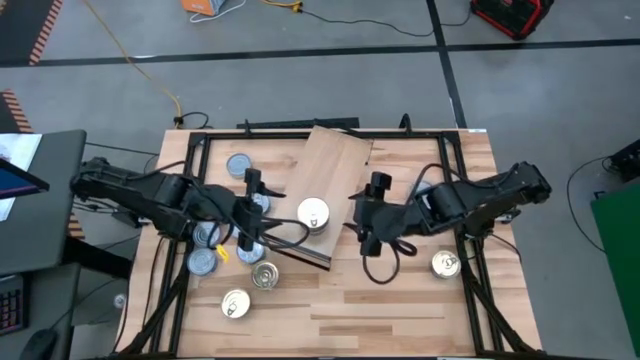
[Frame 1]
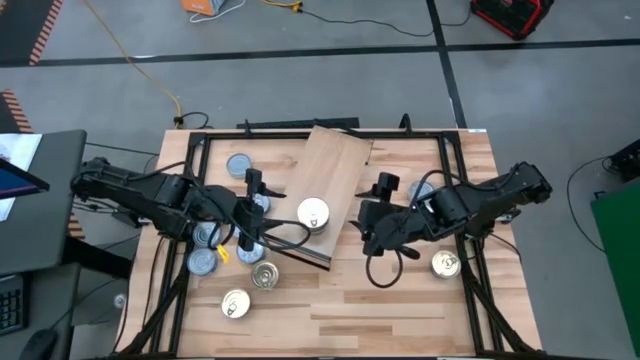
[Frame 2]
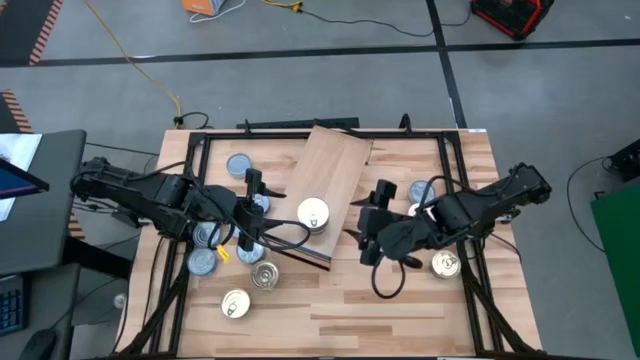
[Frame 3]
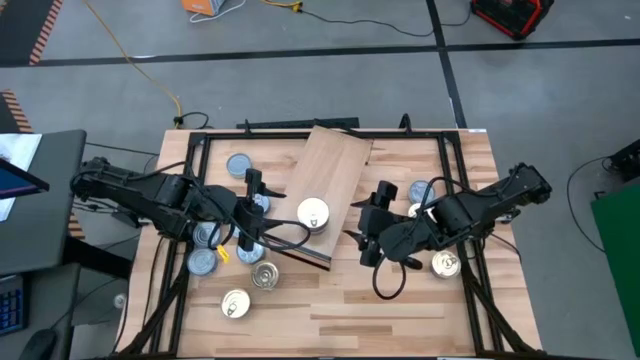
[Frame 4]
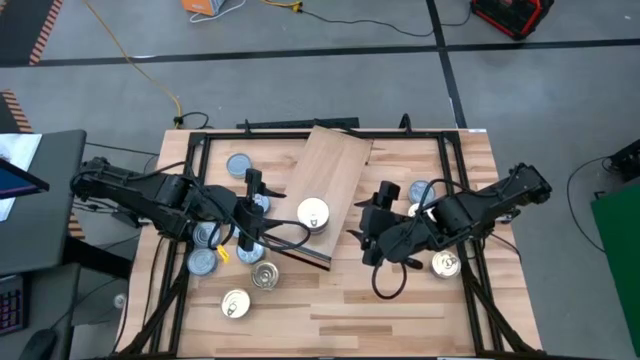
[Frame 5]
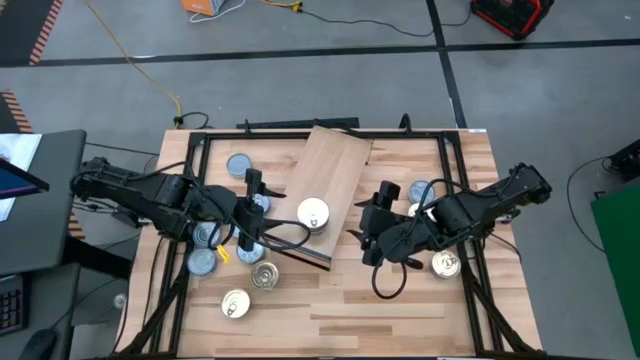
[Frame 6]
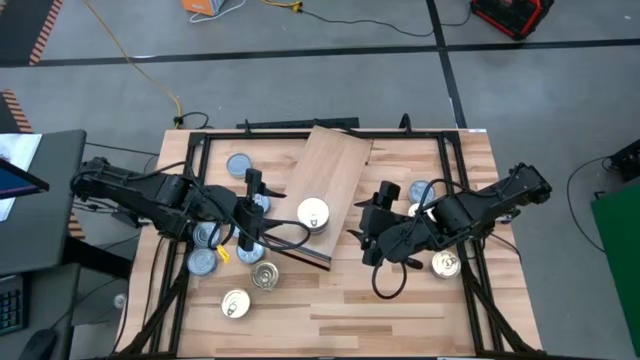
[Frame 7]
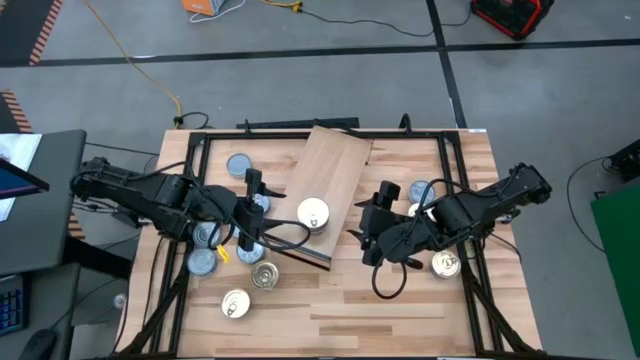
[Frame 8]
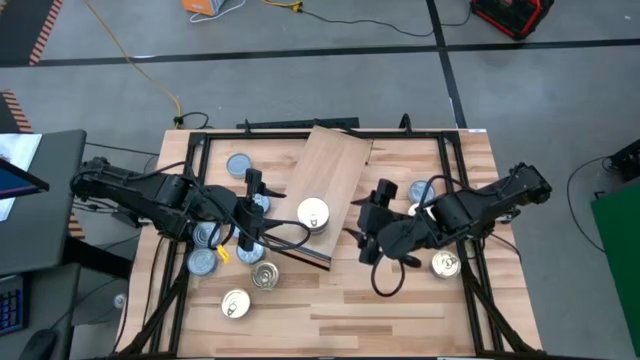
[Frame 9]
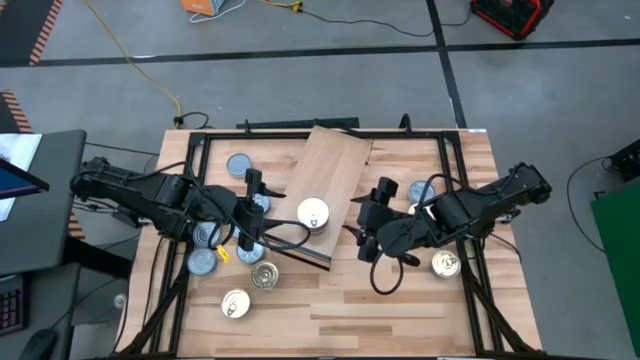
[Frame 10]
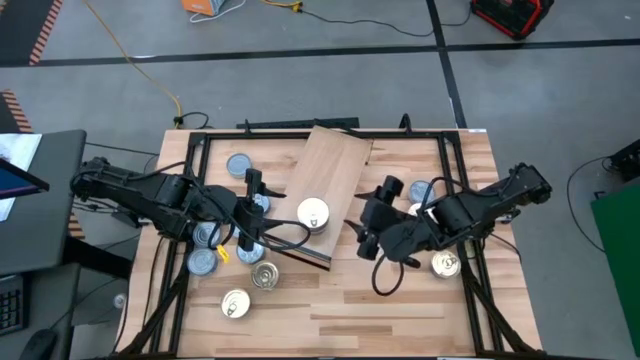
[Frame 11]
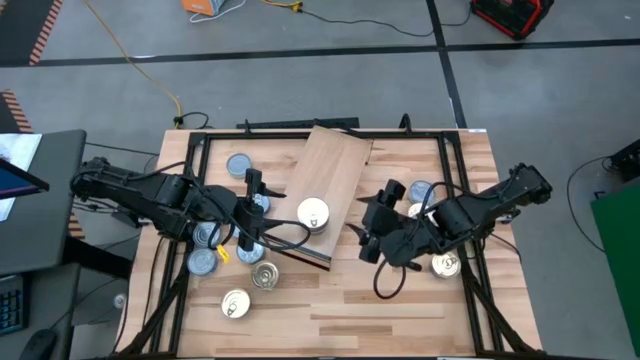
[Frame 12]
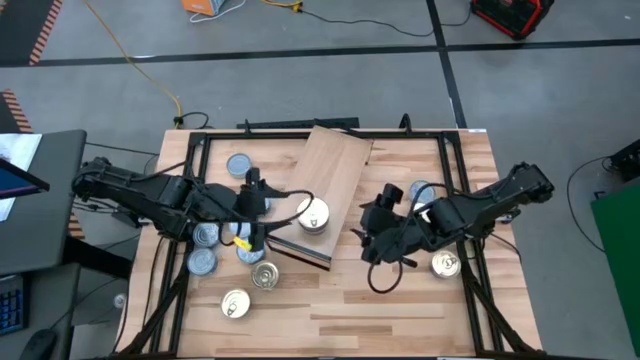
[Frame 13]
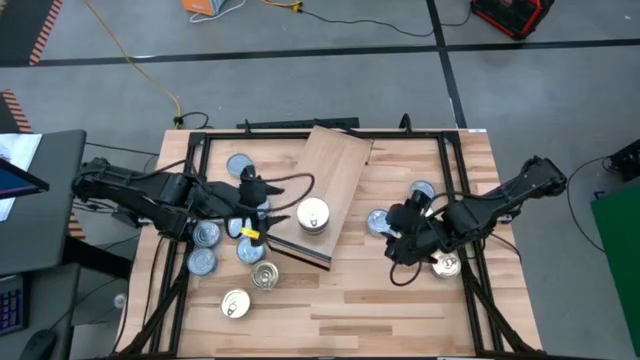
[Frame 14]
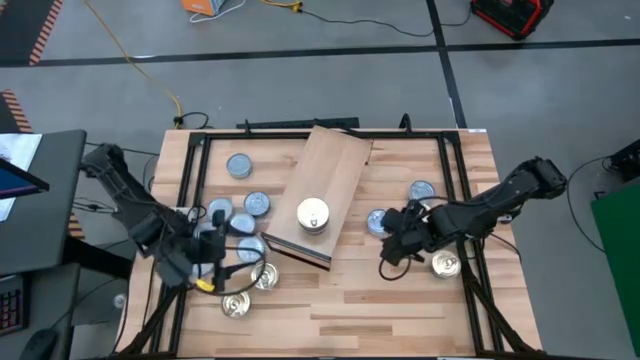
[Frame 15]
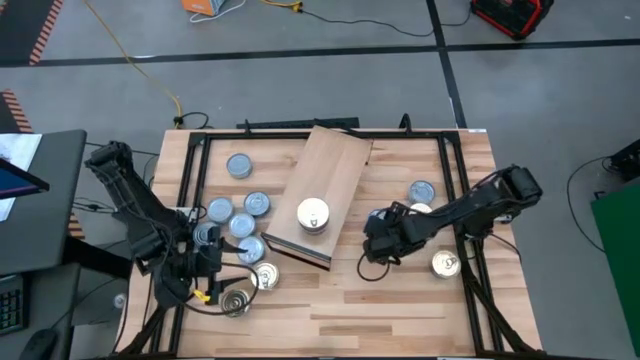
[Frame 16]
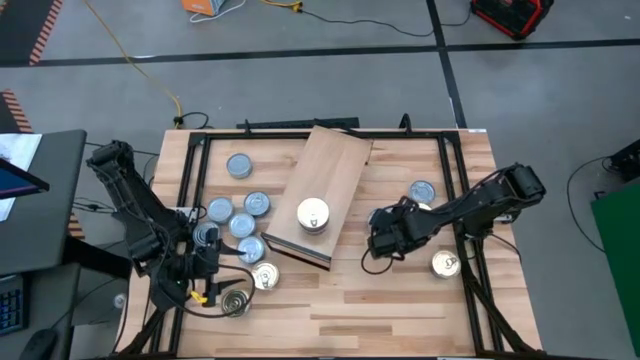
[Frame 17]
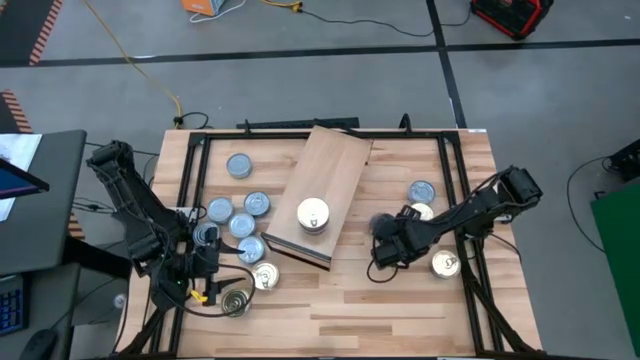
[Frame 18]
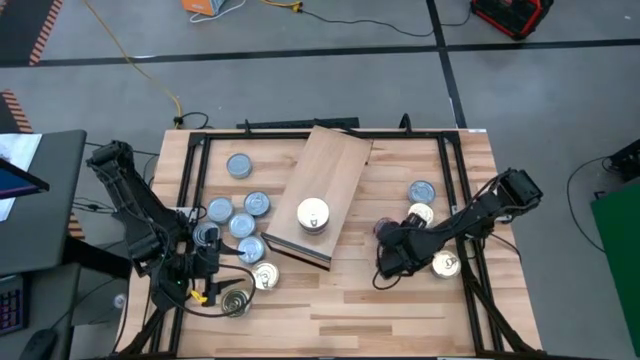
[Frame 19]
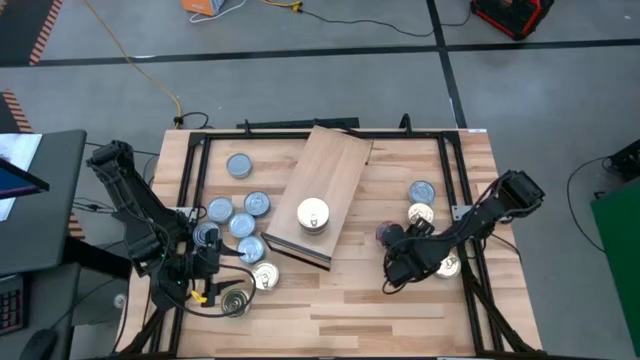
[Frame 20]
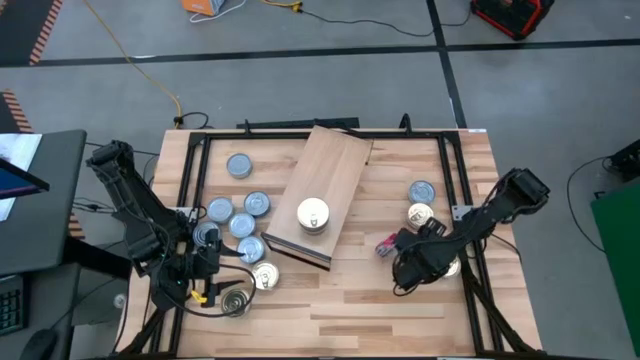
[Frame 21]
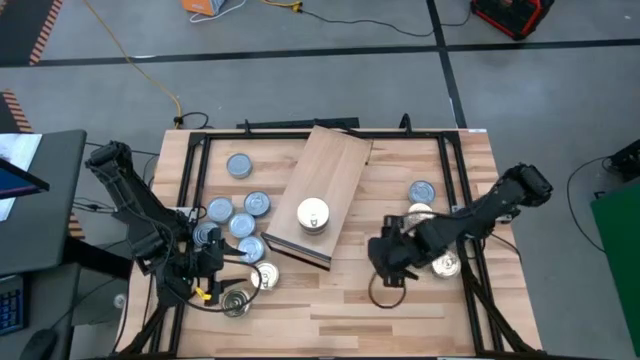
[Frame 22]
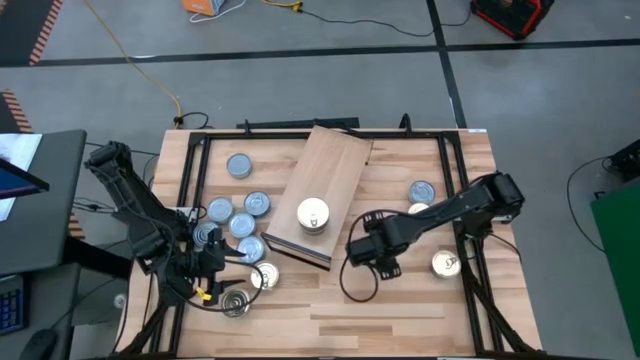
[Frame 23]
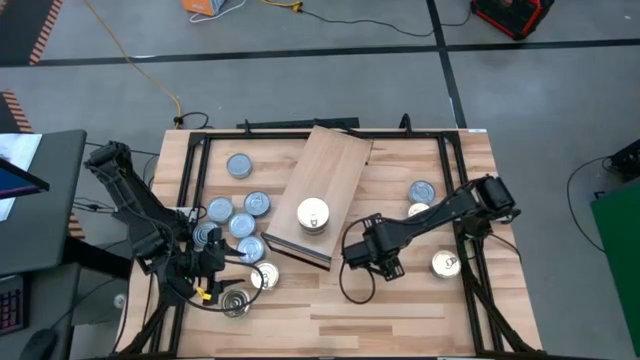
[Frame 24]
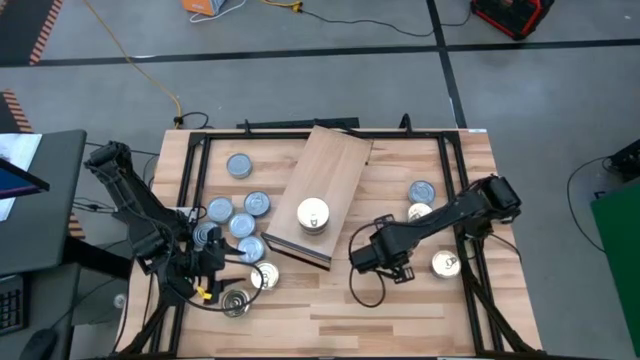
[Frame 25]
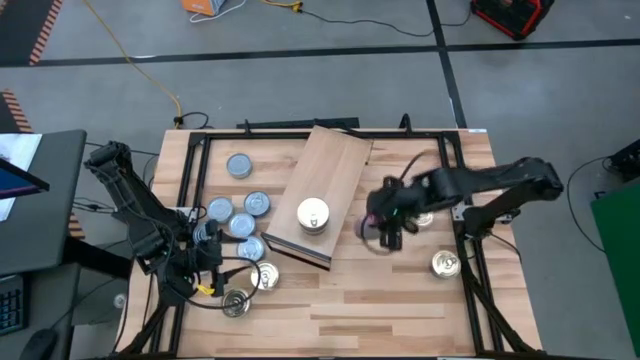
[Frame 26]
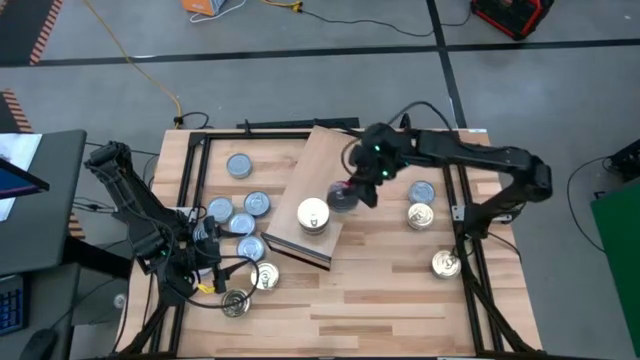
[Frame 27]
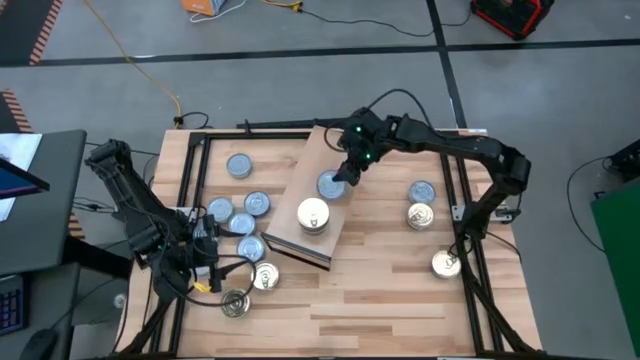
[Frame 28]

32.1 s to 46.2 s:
Task: Stack canned seafood by type on shelf
Put the red tuna can on the shelf

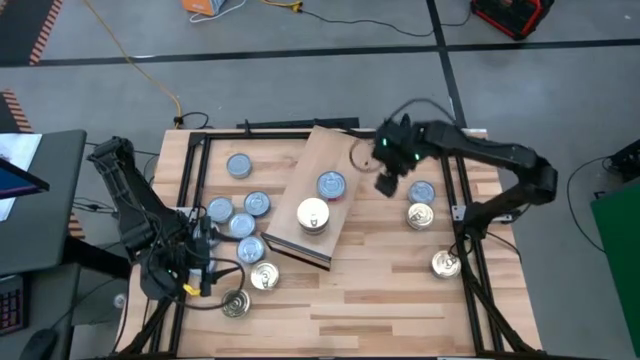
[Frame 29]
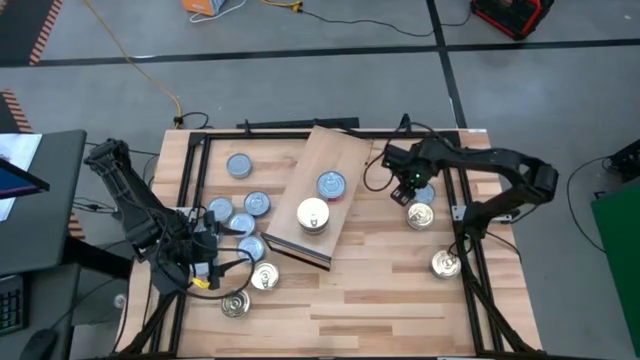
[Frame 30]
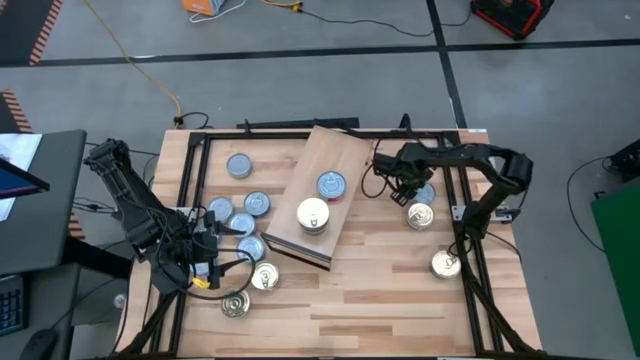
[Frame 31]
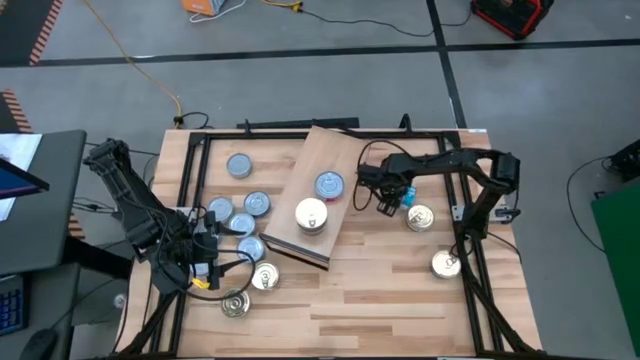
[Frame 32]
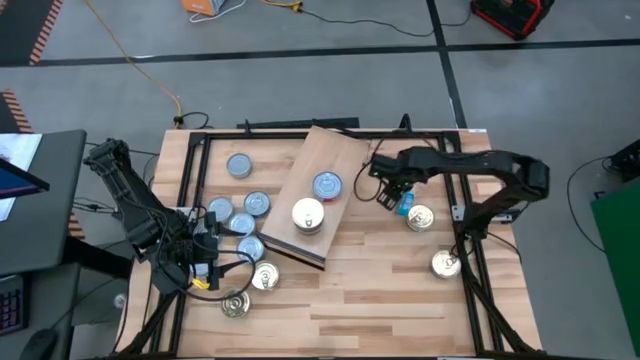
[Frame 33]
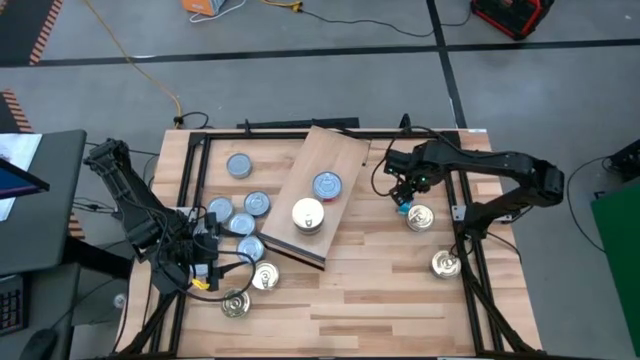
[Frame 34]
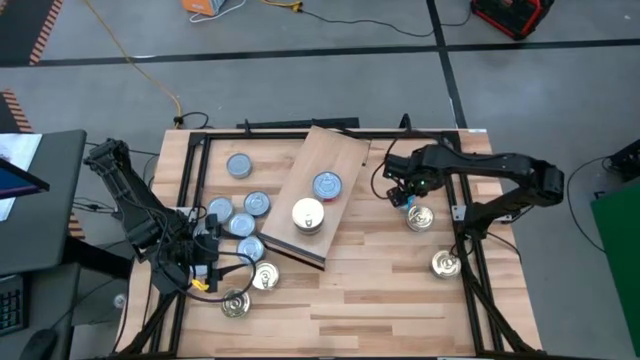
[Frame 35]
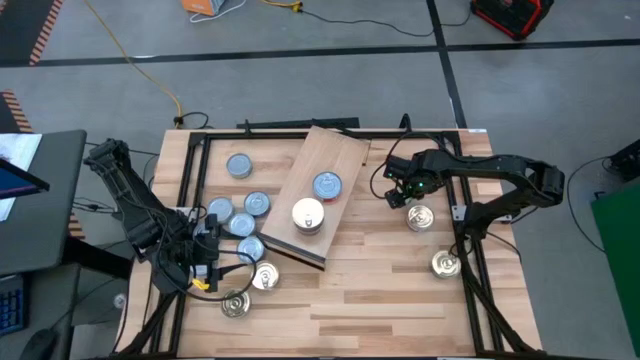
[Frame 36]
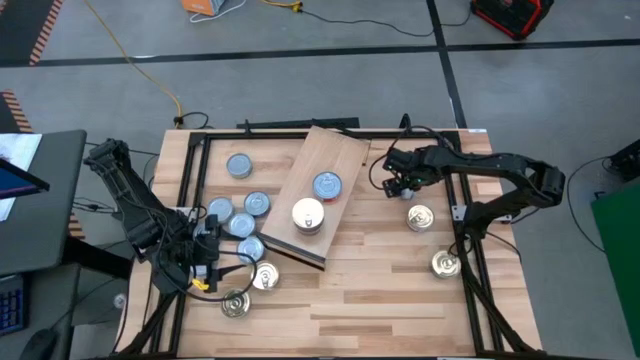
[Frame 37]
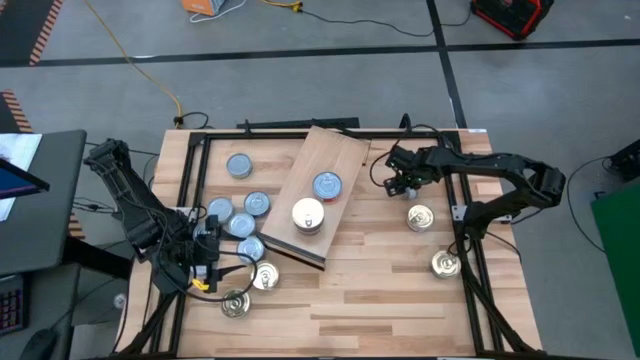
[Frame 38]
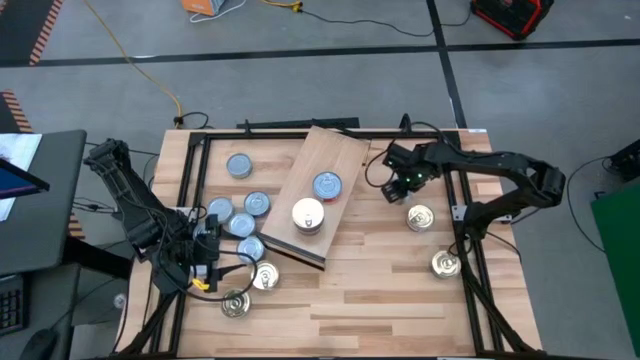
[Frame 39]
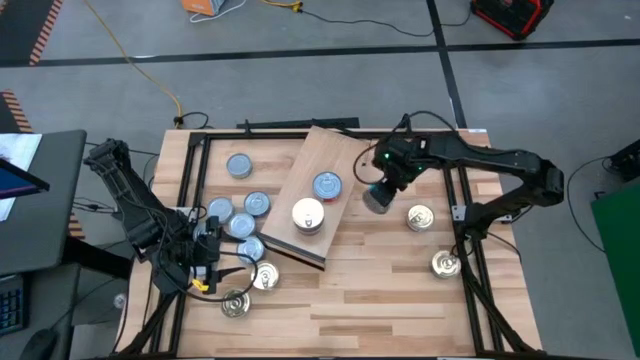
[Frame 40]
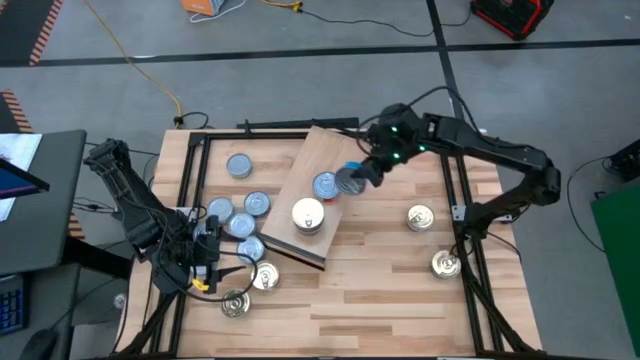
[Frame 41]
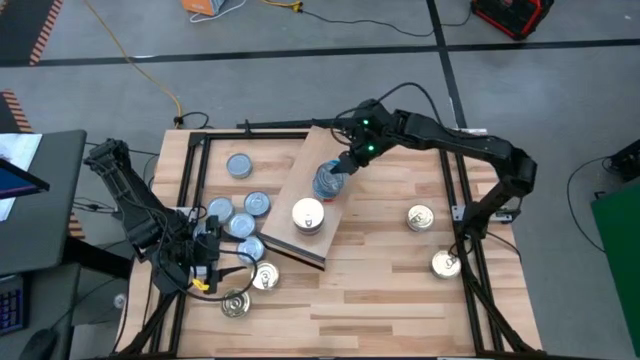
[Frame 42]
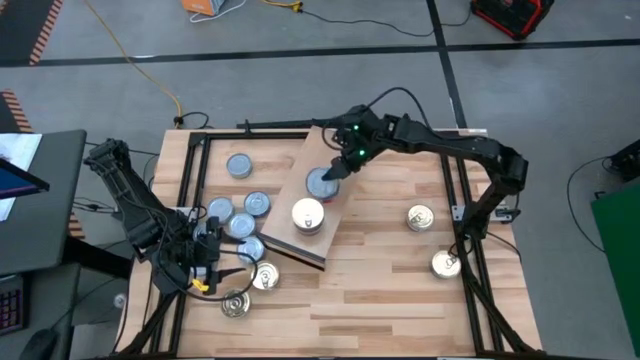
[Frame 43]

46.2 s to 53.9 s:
Stack the yellow blue tuna can on top of the red tuna can on the shelf
